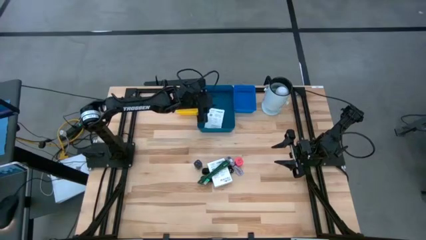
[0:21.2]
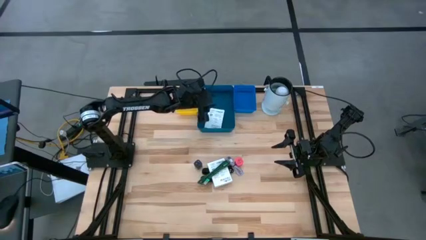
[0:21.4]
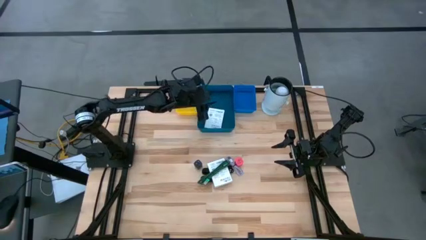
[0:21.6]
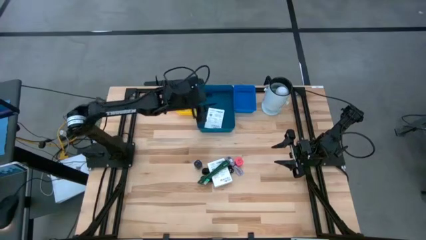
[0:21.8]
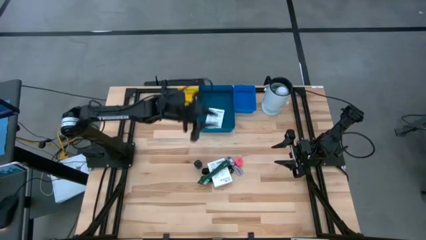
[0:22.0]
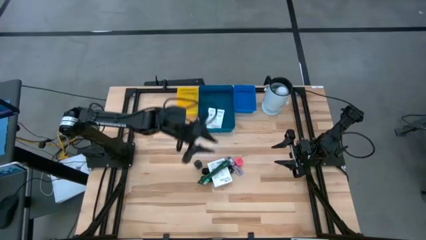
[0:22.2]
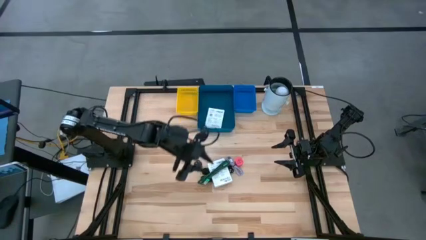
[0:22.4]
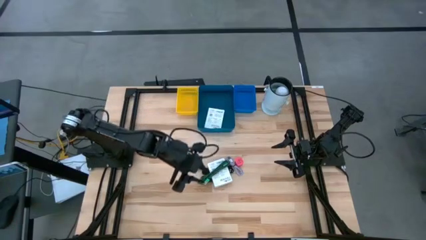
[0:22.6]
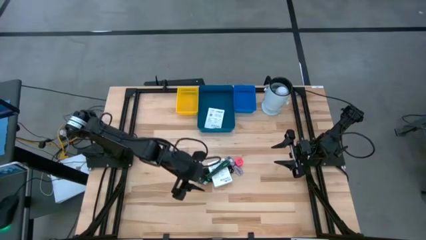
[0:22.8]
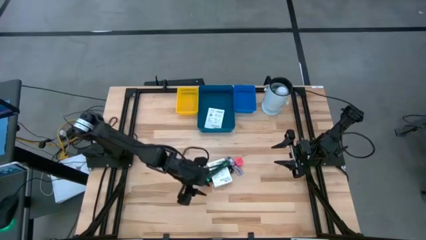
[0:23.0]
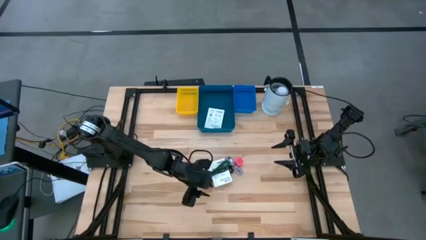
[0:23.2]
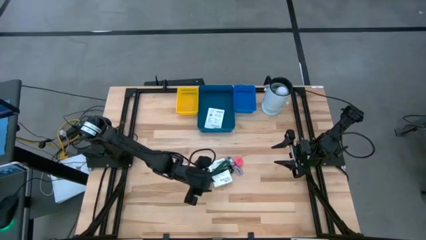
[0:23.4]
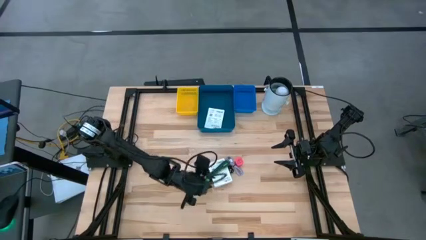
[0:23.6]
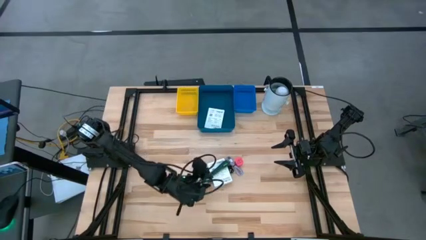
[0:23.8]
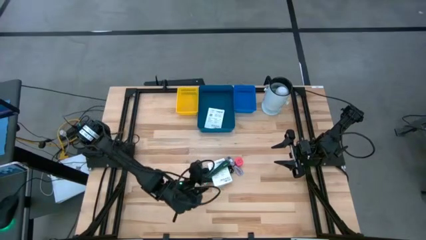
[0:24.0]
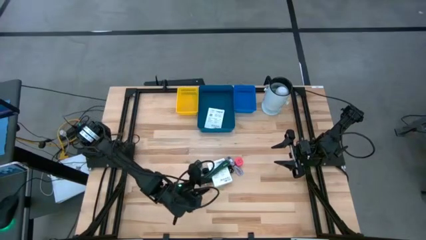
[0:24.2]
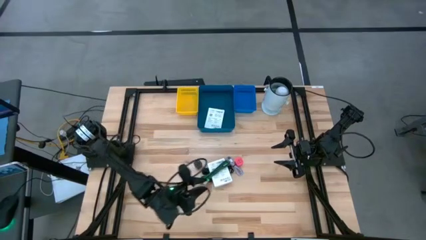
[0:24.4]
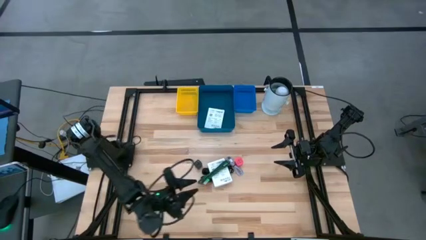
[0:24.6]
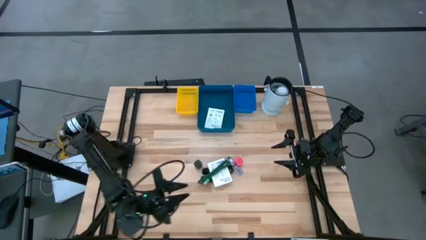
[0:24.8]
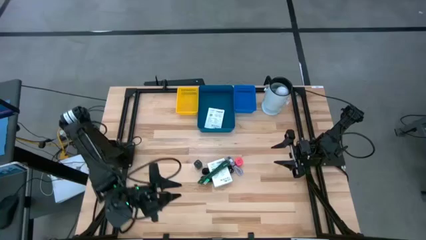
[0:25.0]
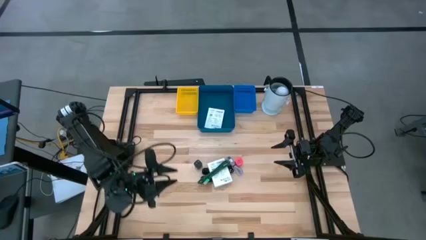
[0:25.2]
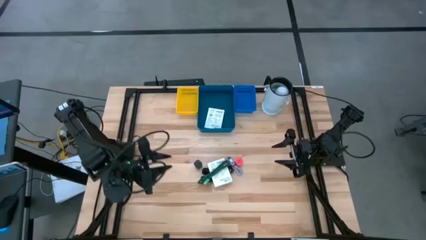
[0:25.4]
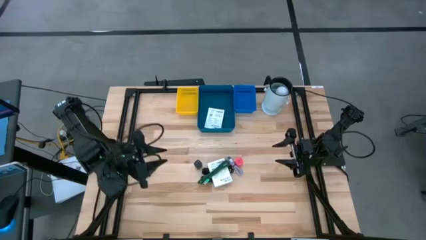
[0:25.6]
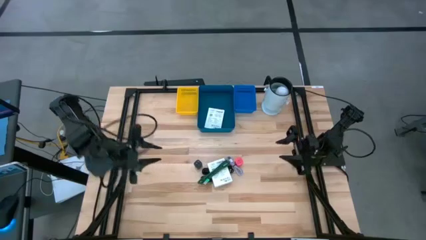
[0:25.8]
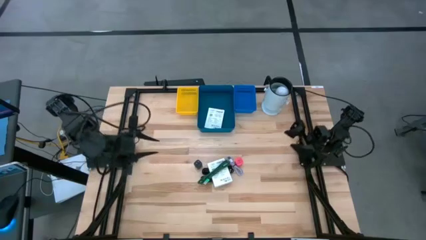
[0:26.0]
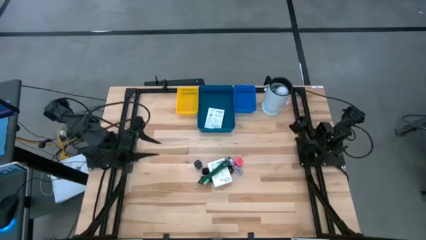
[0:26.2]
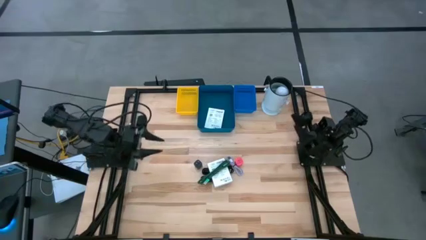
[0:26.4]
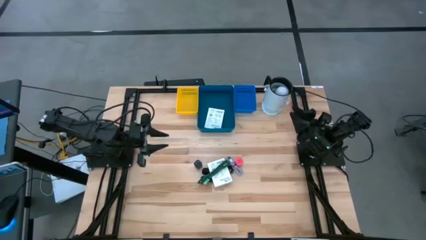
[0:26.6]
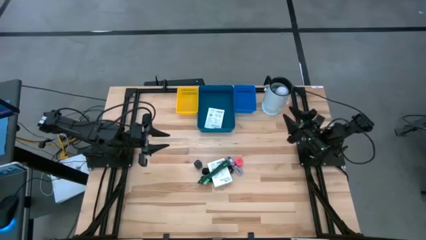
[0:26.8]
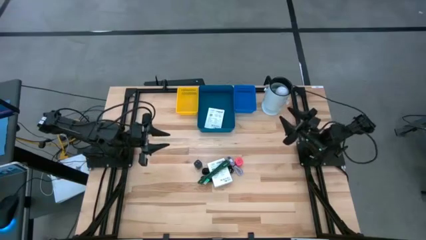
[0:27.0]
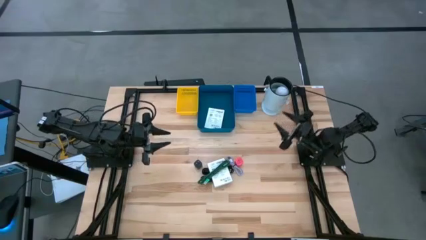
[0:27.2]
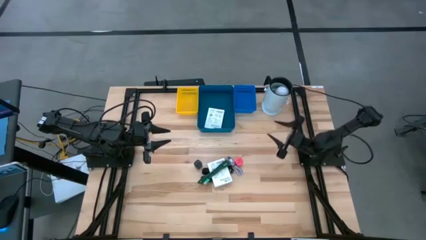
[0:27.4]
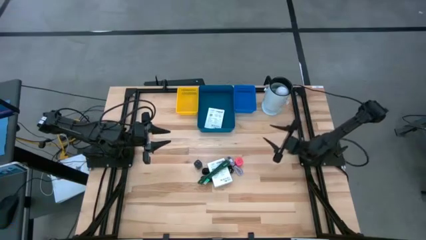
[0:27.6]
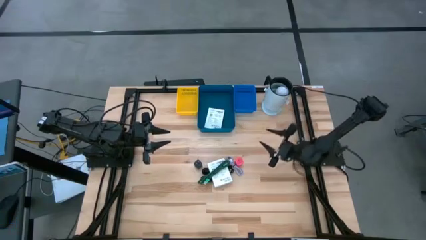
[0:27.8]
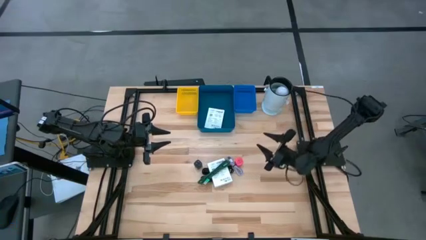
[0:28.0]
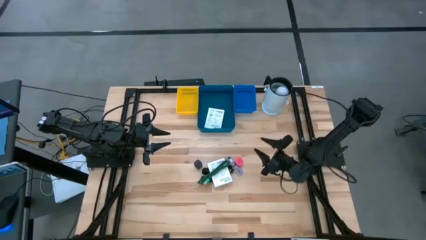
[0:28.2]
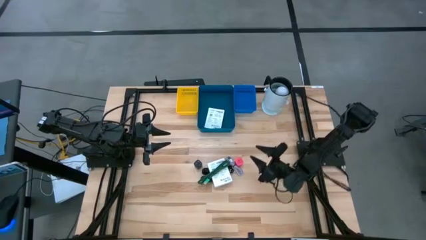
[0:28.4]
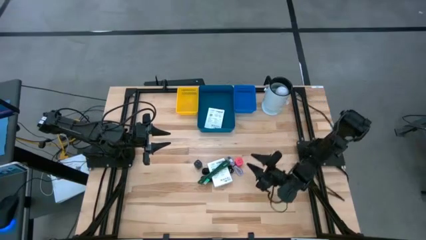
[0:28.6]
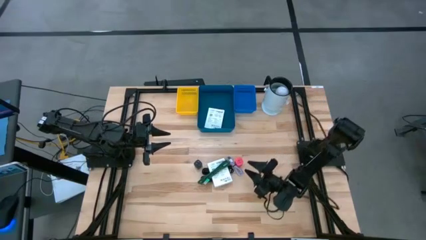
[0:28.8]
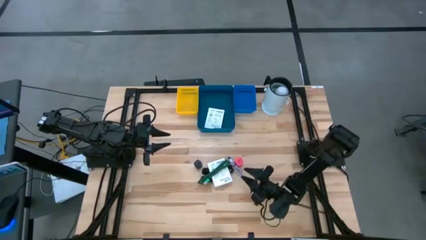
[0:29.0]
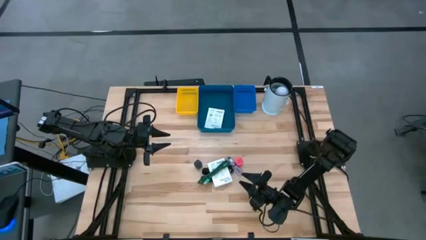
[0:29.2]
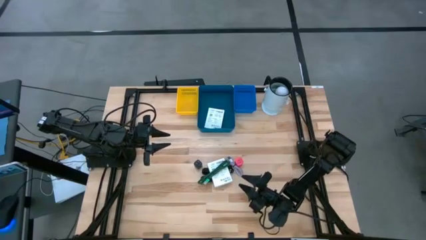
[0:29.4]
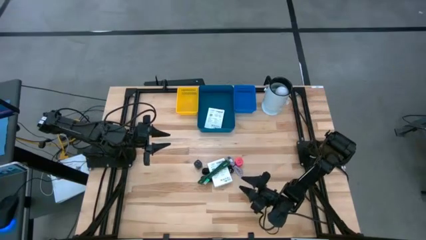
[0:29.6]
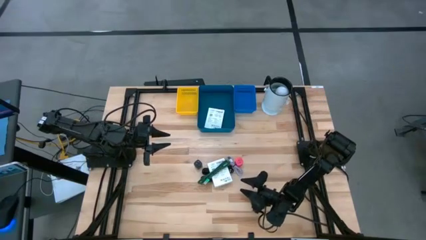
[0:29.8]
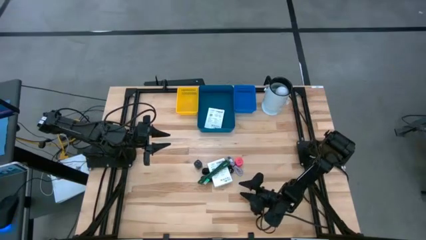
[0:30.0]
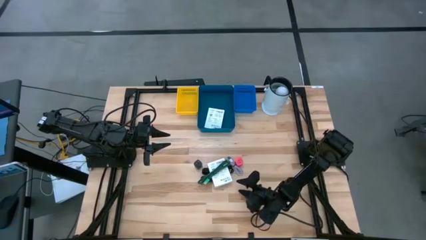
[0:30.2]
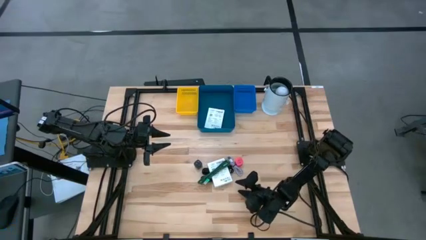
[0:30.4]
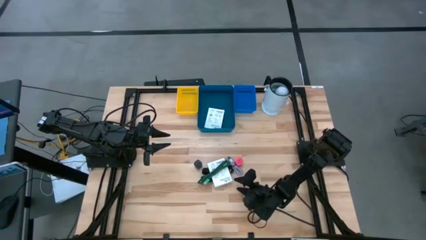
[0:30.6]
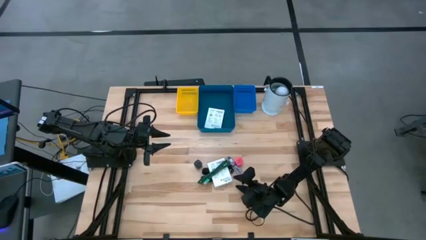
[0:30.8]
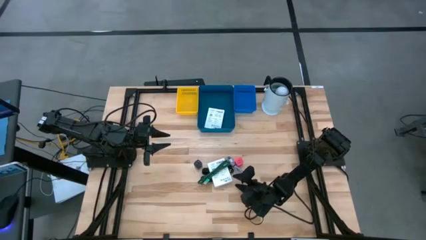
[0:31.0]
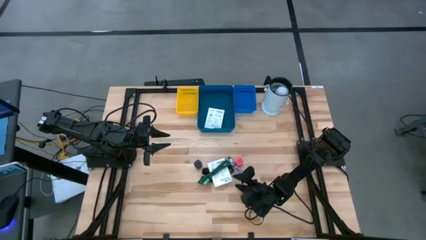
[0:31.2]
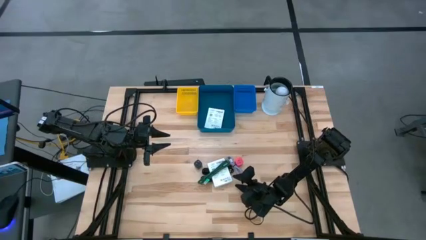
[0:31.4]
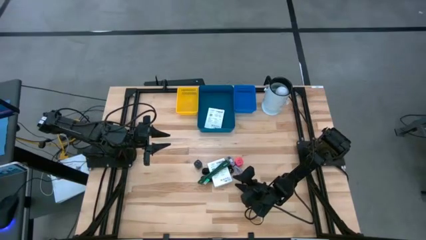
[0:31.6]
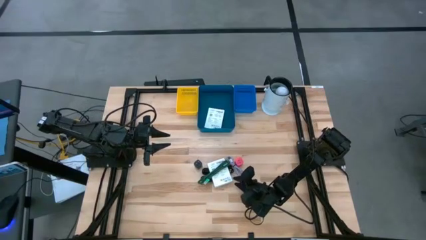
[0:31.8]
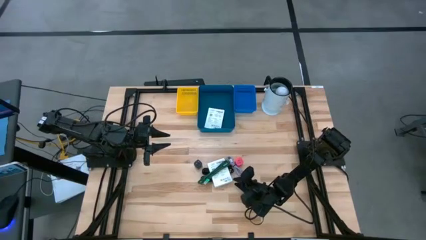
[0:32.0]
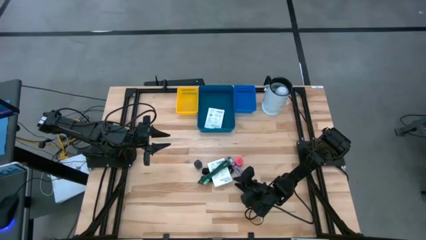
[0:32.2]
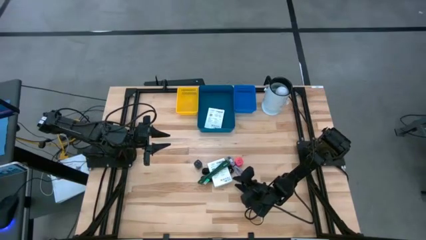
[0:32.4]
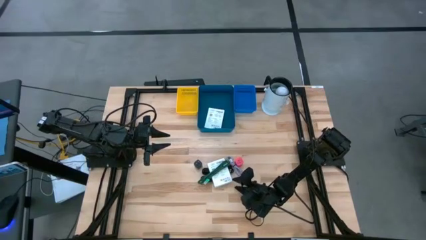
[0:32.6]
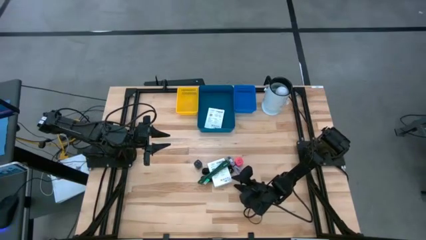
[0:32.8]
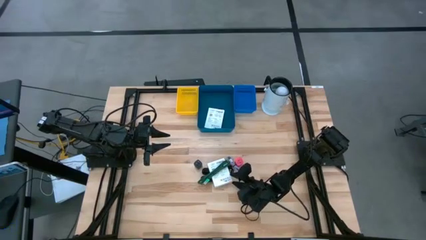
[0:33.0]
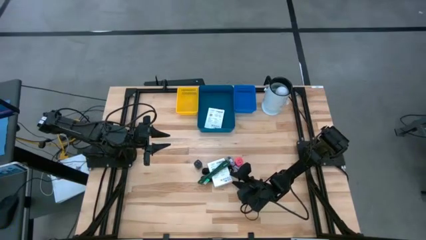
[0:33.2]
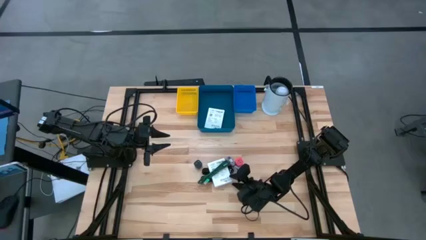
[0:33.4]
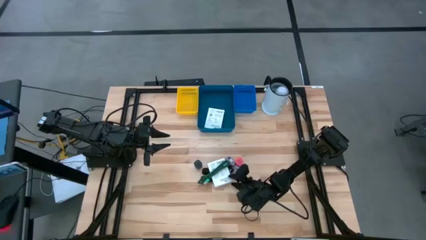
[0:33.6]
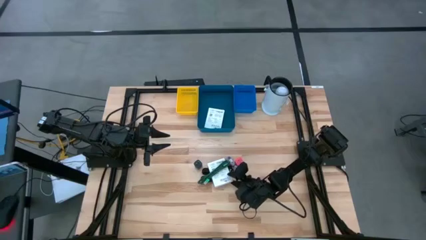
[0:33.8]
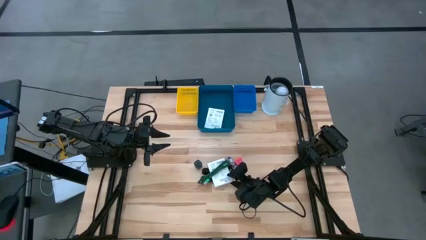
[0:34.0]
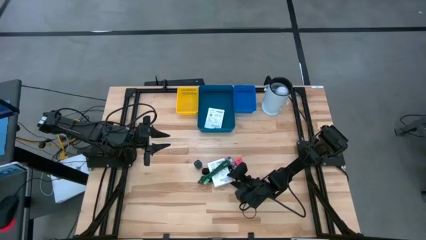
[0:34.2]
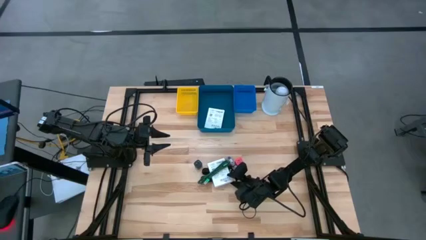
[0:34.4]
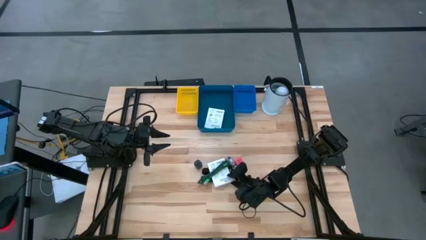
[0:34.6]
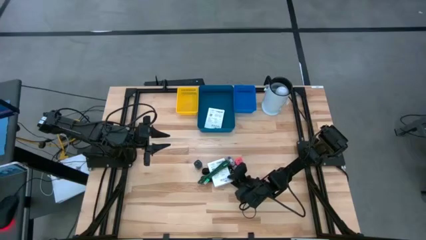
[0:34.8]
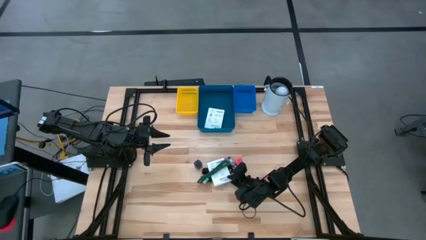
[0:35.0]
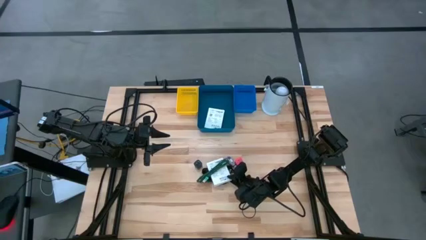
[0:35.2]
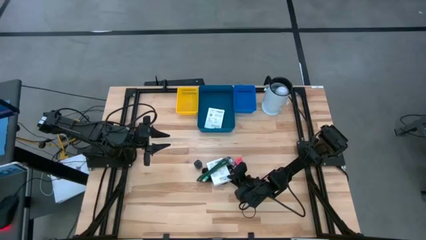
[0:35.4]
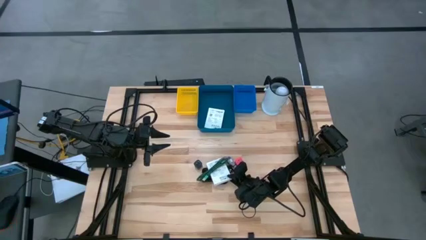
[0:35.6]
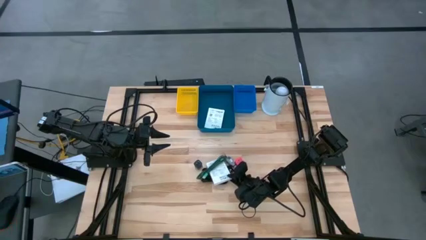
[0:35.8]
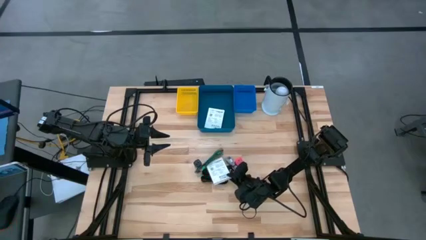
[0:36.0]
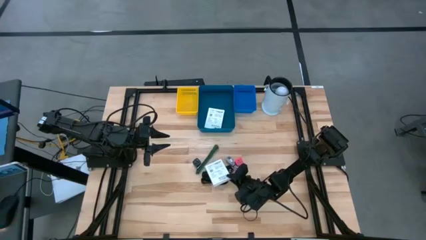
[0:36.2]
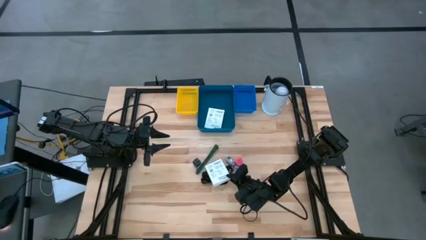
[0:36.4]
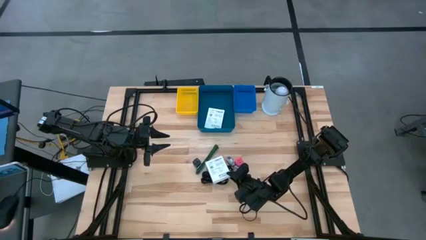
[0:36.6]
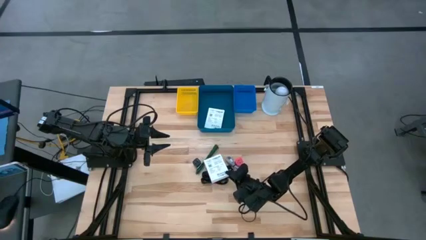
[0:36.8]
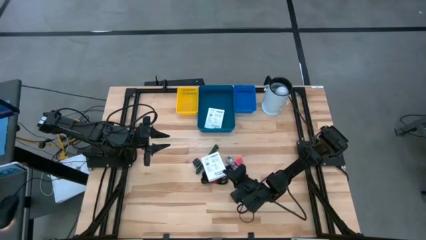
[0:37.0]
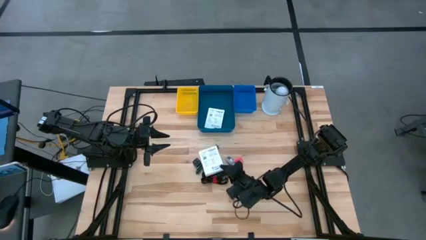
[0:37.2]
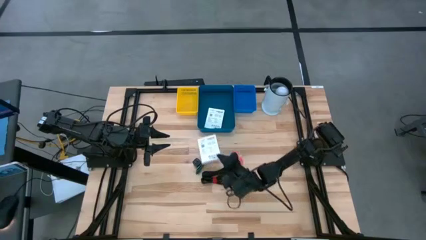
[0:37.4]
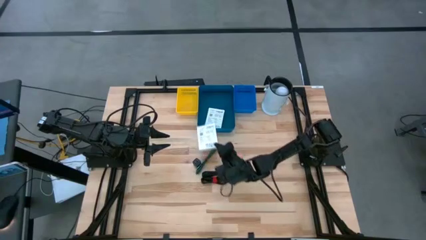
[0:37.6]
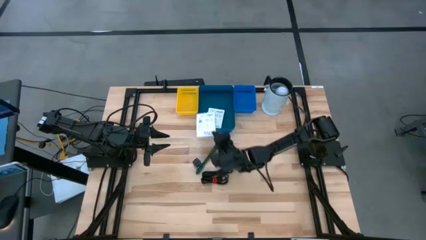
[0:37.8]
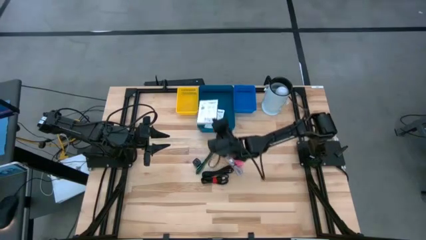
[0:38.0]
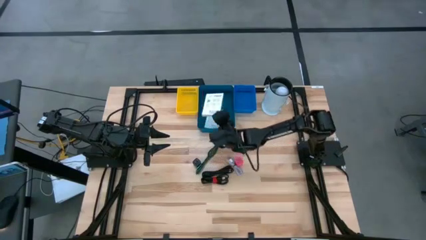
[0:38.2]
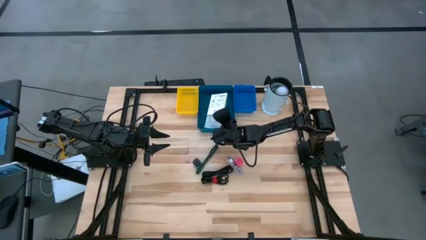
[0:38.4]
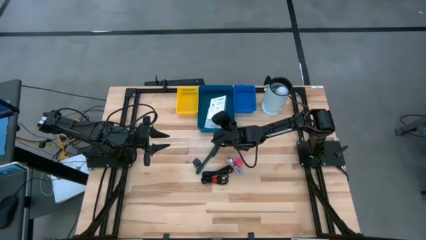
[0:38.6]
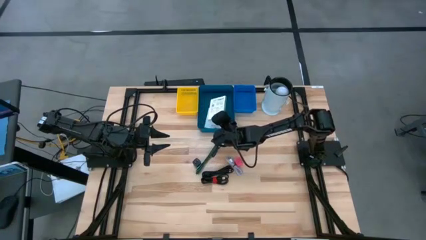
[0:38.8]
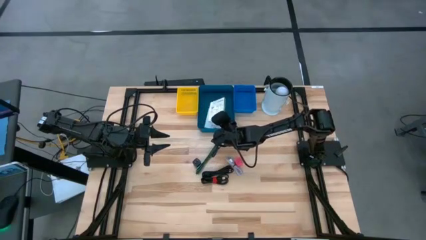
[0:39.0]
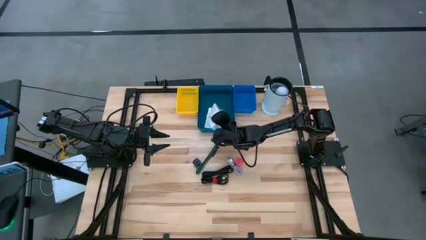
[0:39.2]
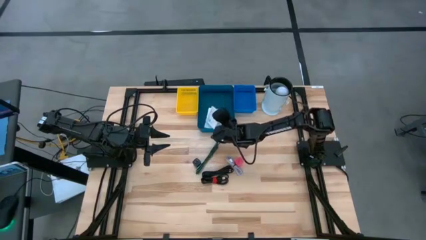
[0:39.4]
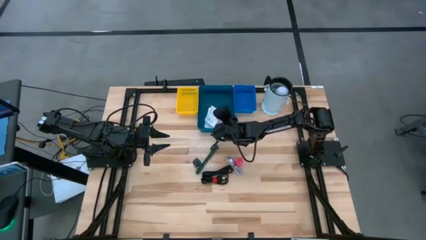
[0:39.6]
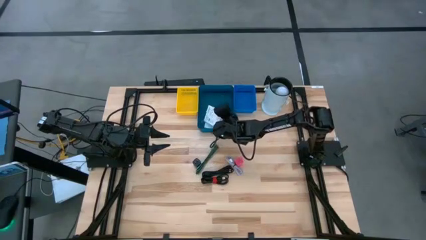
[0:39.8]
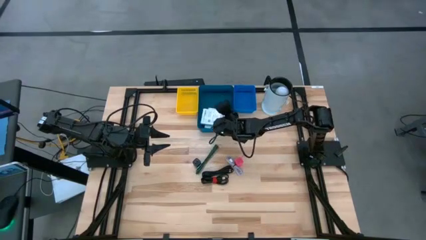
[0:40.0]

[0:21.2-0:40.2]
Task: Pick and place items into bin
Put the white box into the dark blue bin
